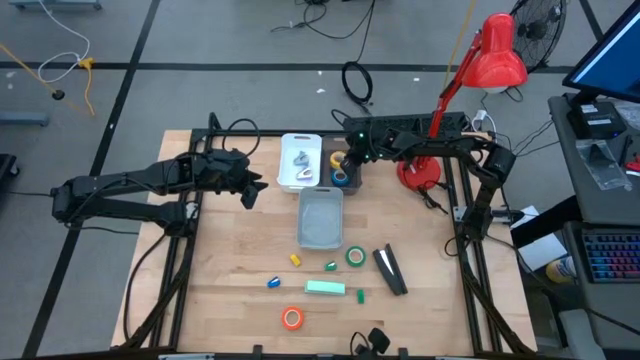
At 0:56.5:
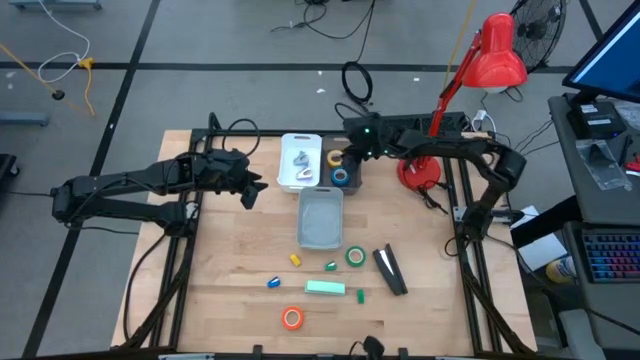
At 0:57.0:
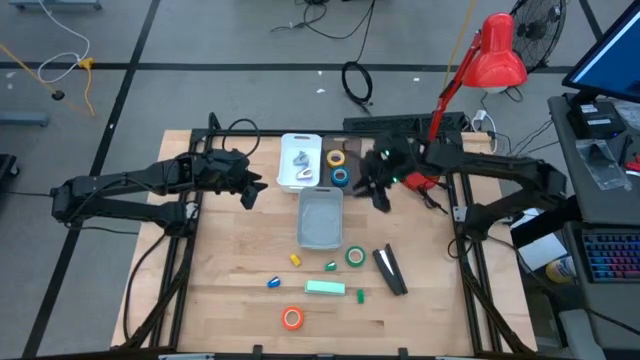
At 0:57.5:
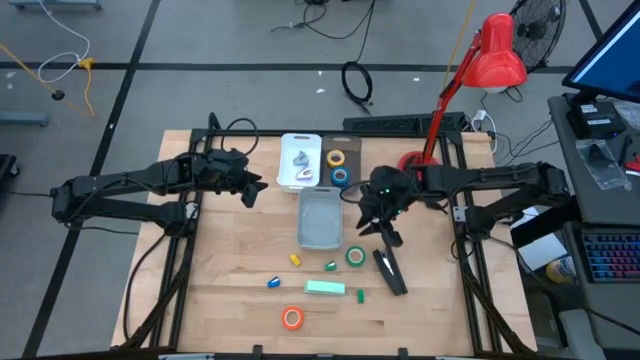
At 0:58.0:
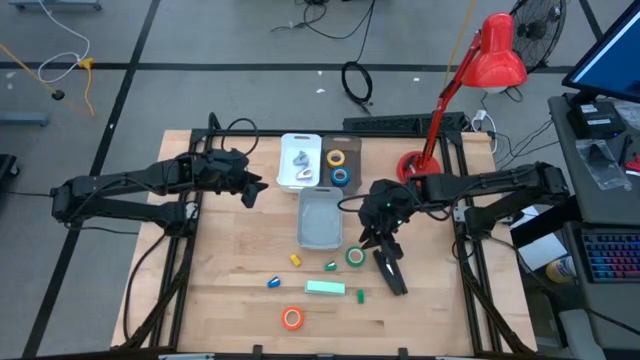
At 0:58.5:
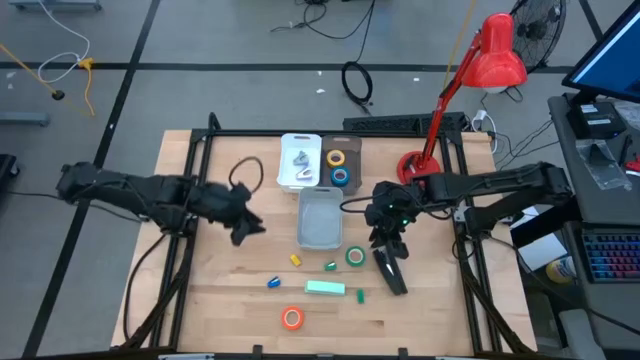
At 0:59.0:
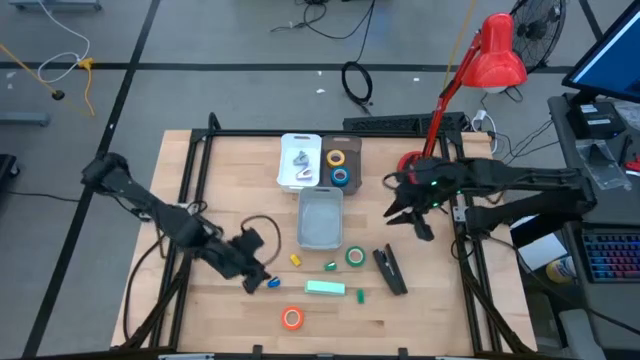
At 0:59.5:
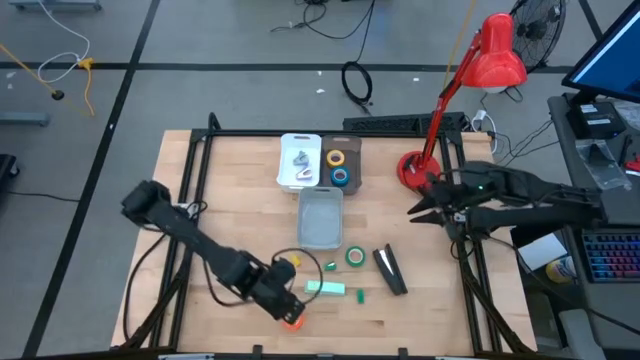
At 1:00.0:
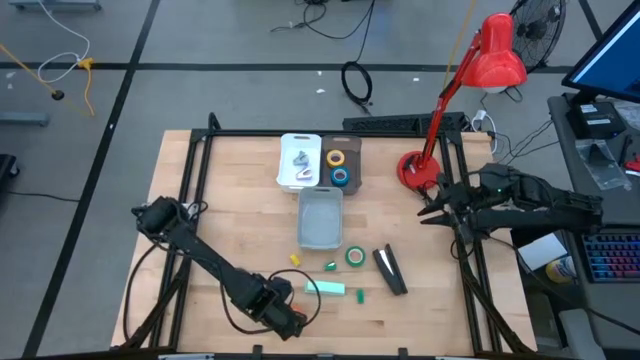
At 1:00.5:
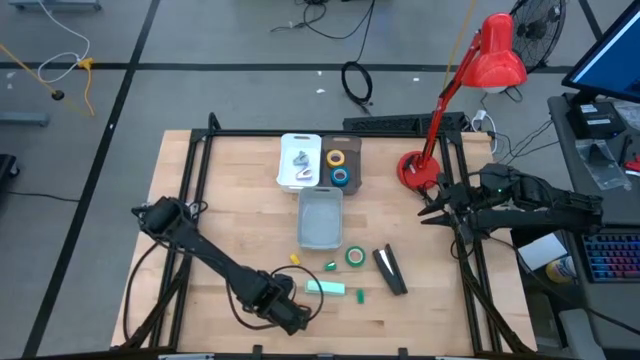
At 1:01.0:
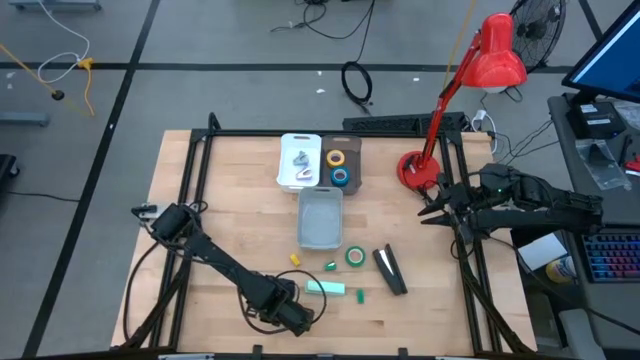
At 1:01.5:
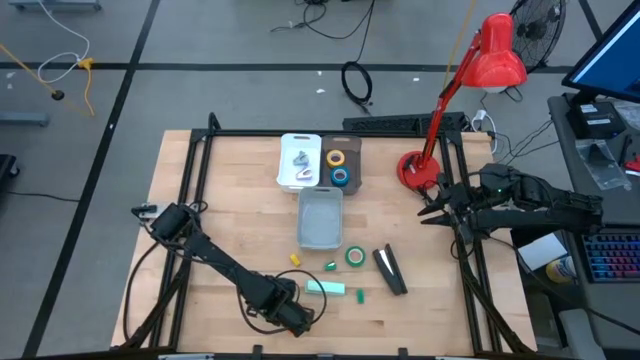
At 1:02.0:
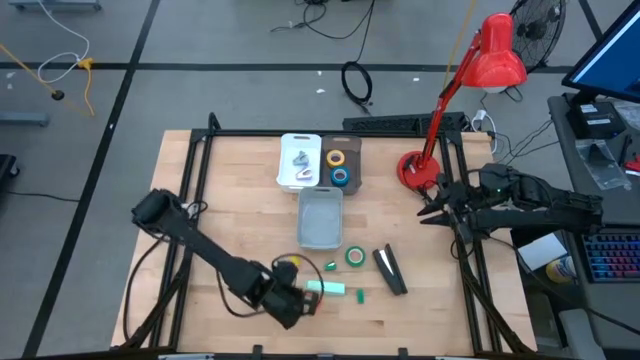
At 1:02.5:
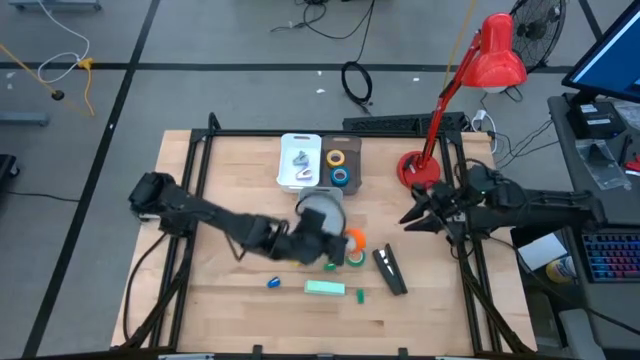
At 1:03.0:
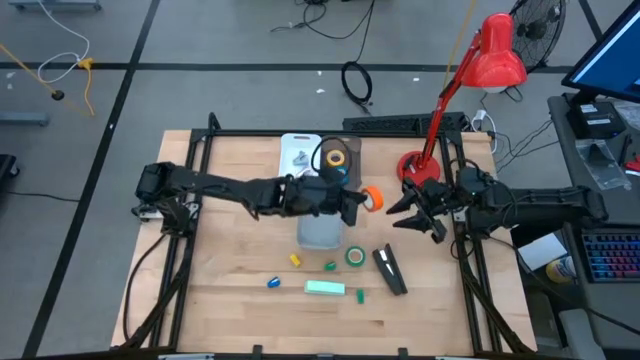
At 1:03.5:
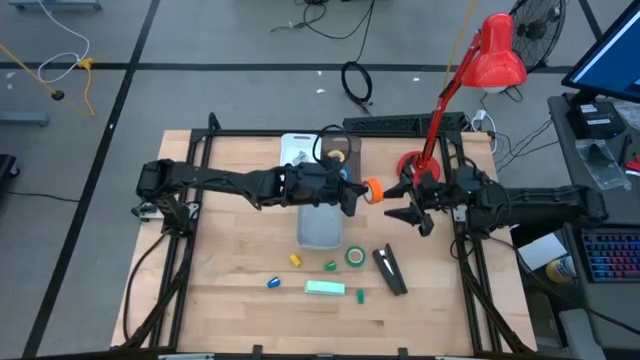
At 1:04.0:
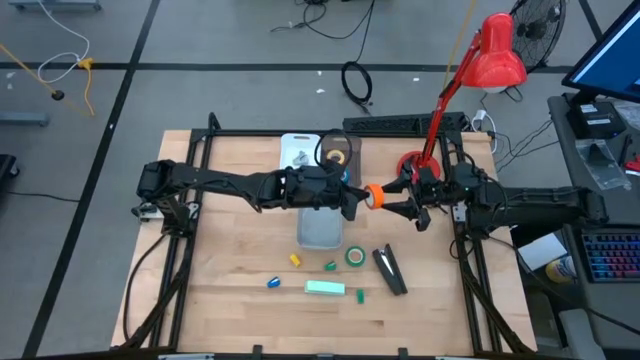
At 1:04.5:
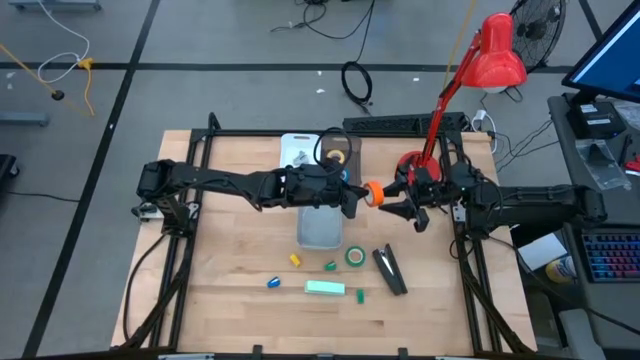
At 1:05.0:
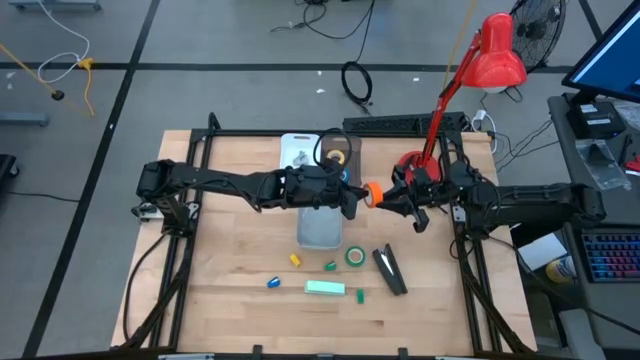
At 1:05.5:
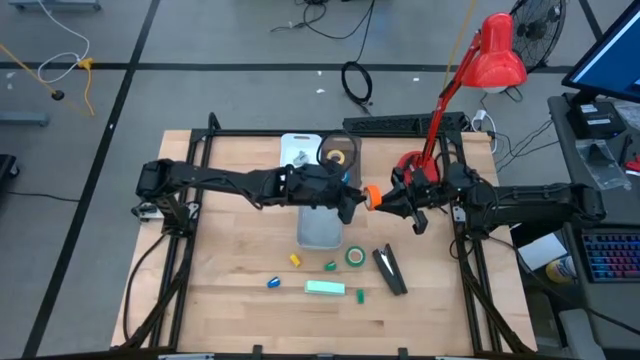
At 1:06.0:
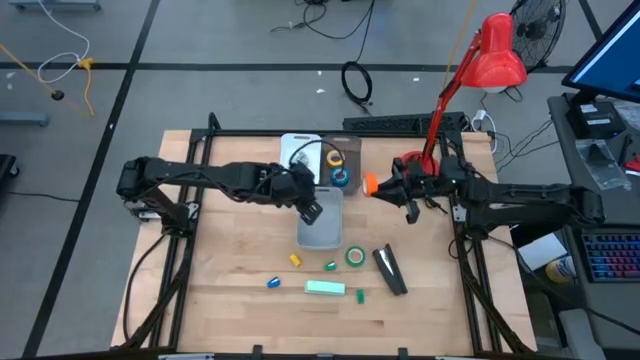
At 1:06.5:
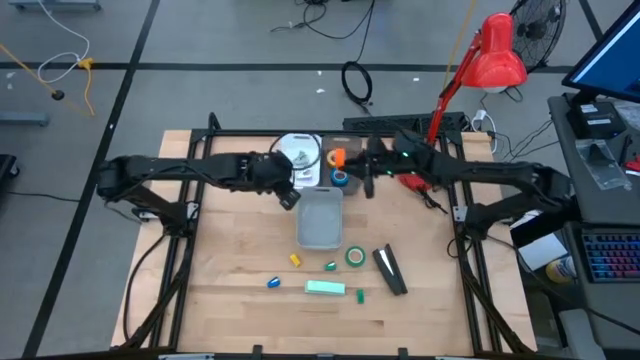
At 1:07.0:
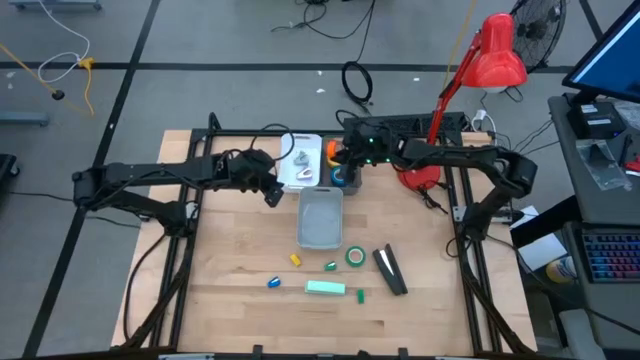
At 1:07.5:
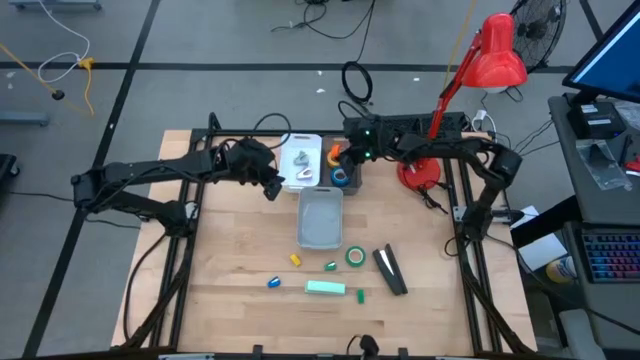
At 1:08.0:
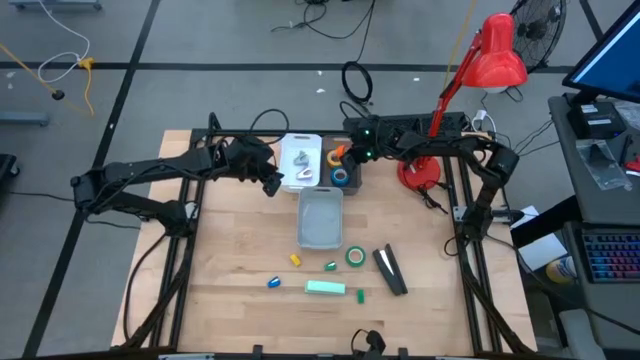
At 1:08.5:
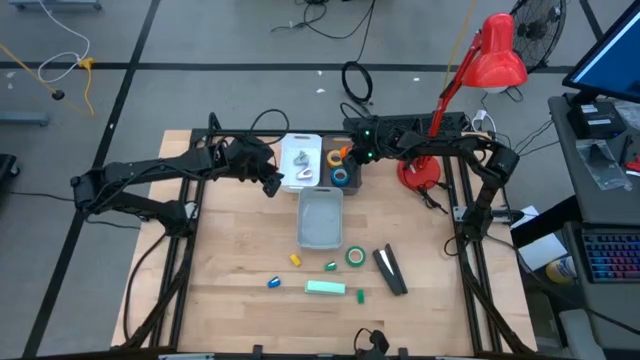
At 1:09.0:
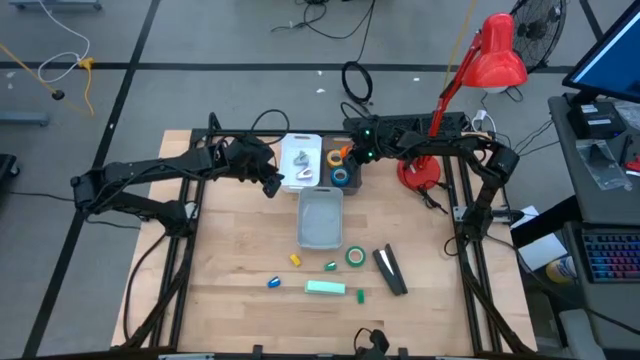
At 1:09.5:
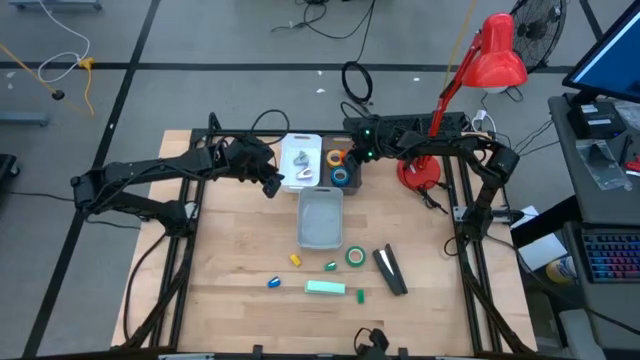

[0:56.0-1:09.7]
Task: Pick and place Stapler, Stapler remover, tape
Put the orange tape into the black bin

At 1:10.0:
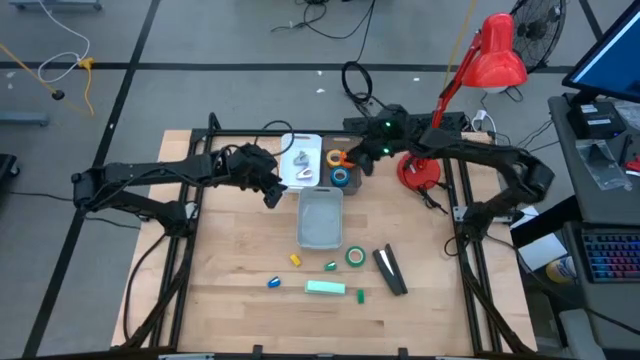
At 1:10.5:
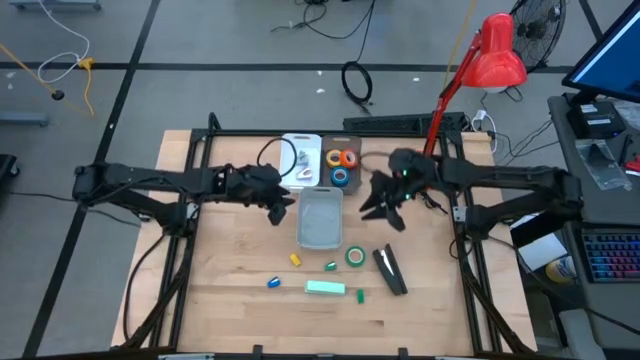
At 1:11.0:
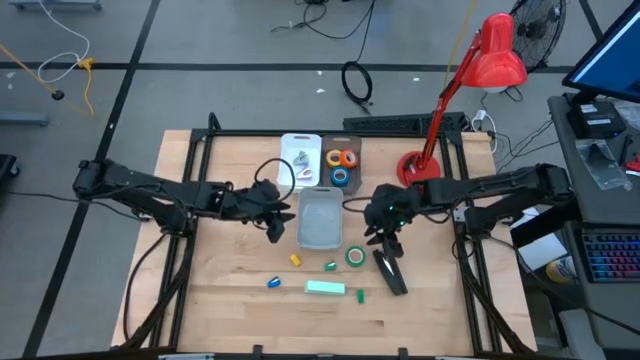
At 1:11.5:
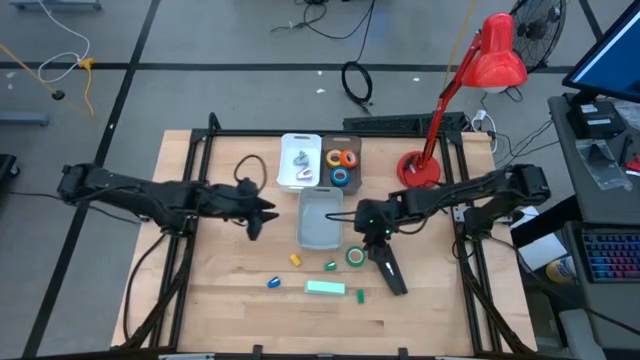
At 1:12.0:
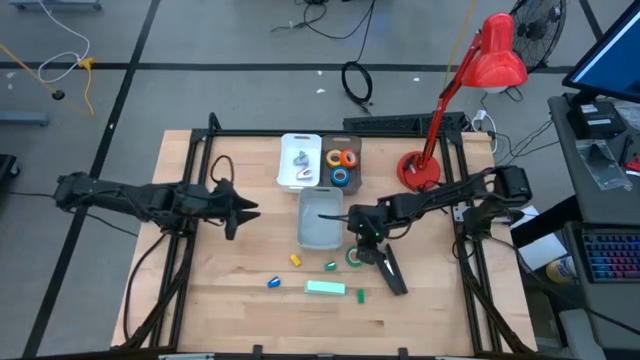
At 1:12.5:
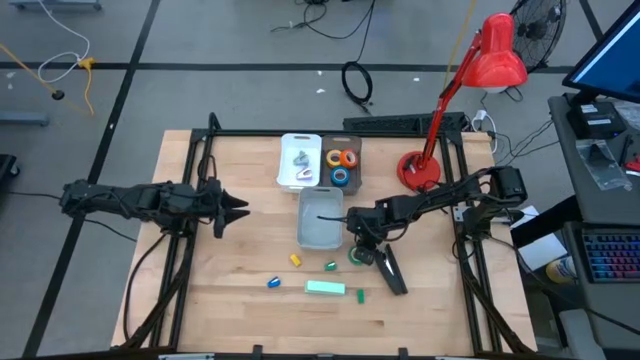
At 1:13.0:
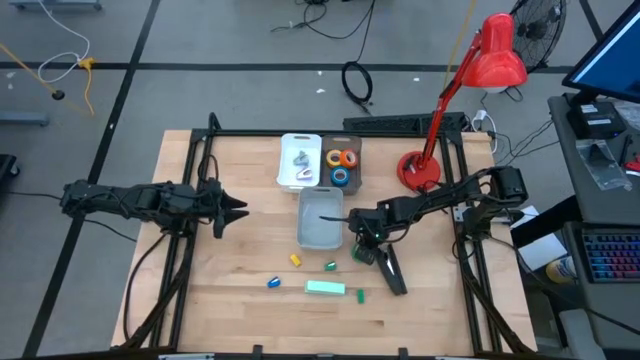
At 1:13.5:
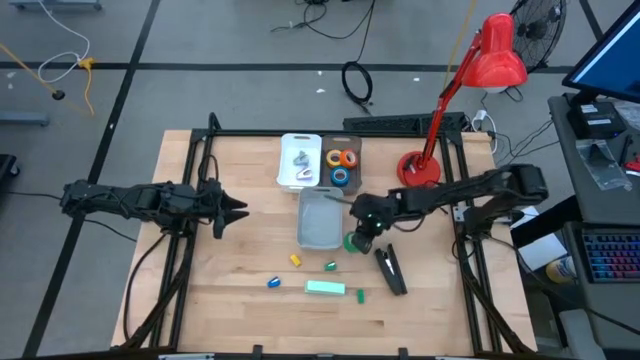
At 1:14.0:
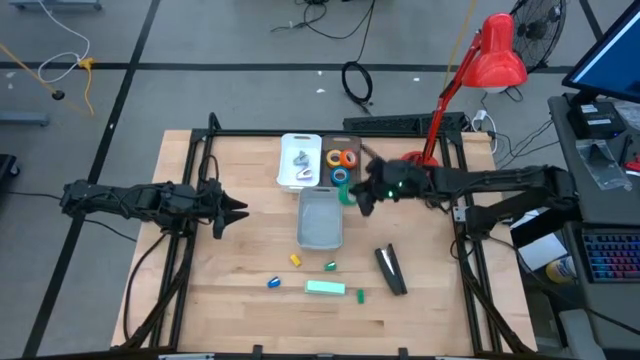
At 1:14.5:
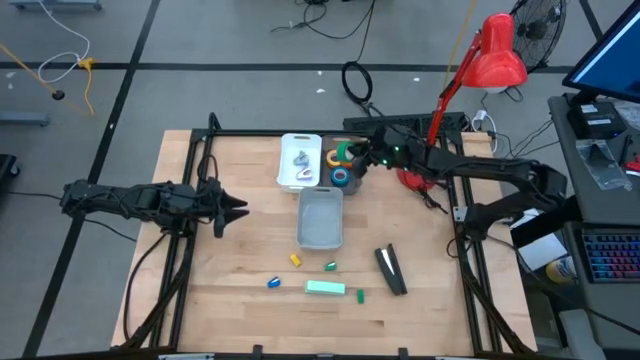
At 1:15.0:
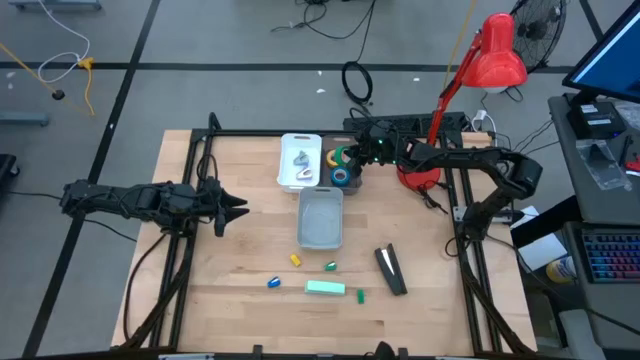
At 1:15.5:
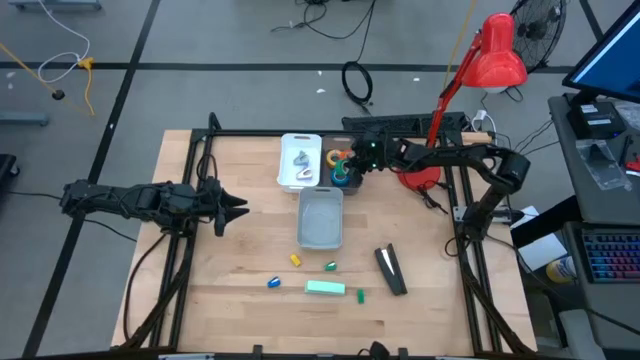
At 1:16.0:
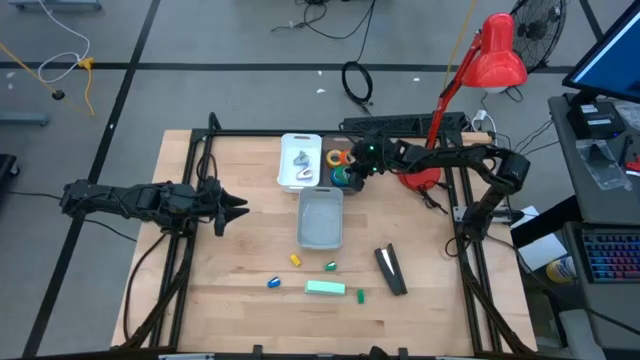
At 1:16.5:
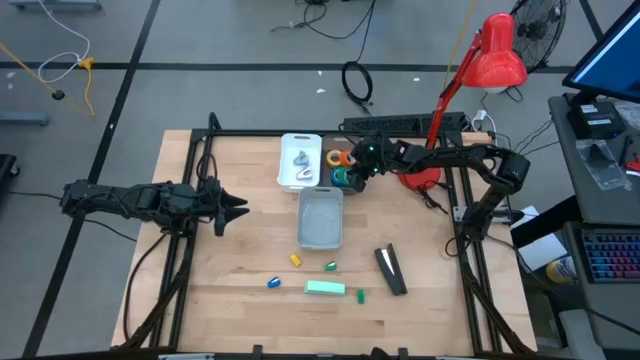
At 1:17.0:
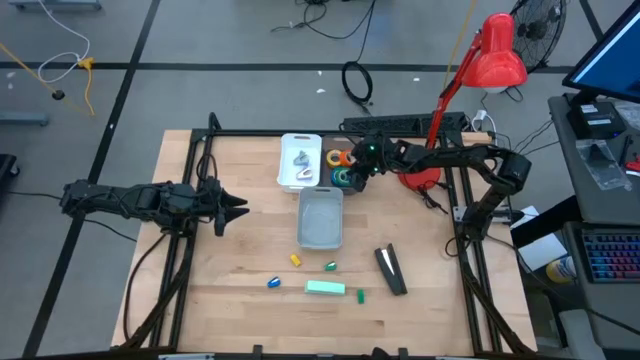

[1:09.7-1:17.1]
Put the green tape into the black bin
